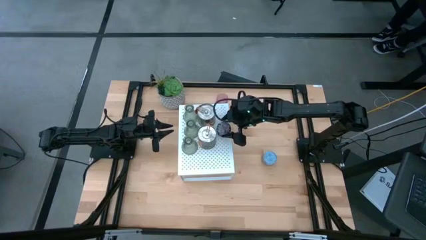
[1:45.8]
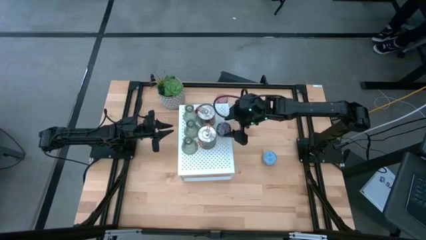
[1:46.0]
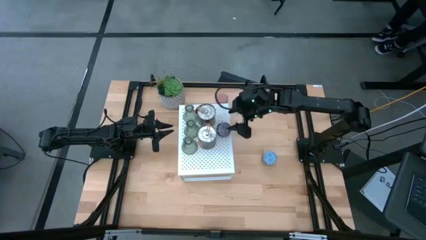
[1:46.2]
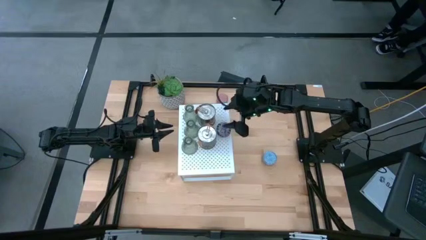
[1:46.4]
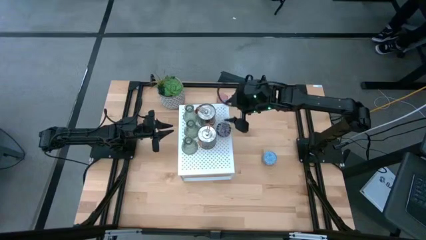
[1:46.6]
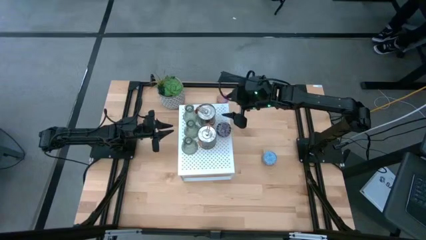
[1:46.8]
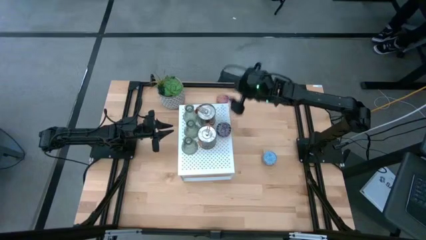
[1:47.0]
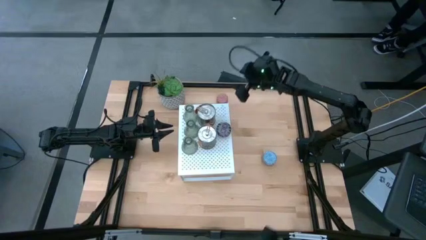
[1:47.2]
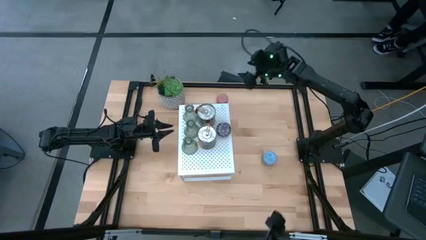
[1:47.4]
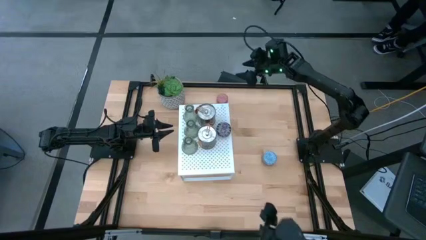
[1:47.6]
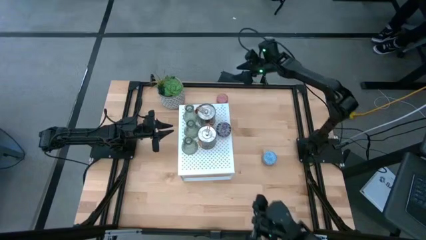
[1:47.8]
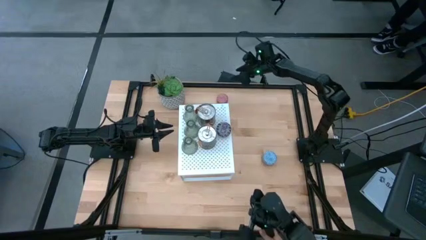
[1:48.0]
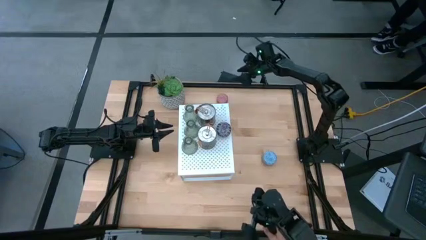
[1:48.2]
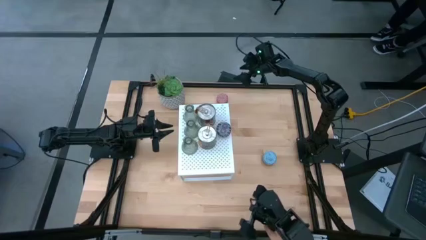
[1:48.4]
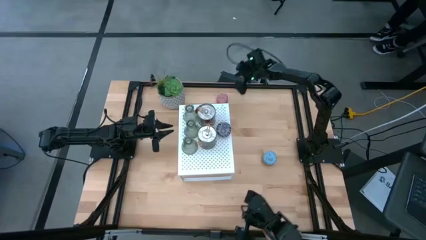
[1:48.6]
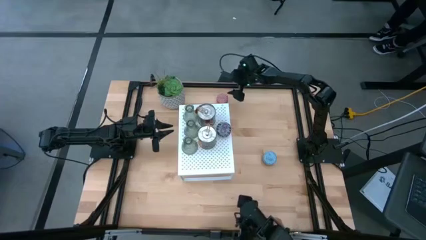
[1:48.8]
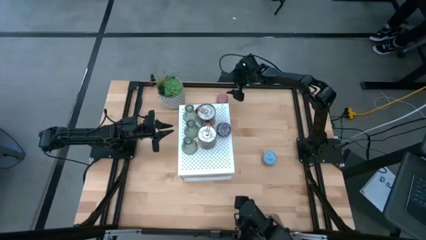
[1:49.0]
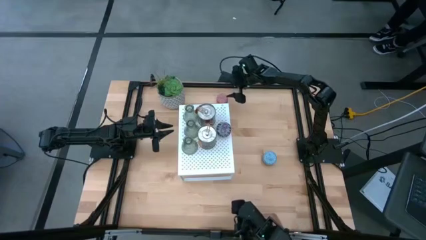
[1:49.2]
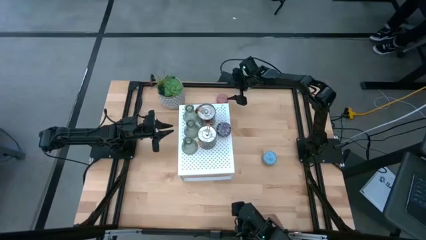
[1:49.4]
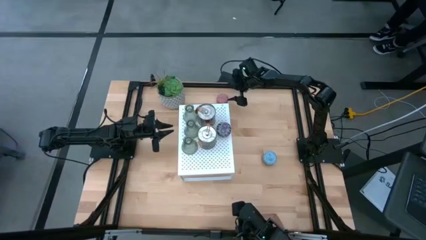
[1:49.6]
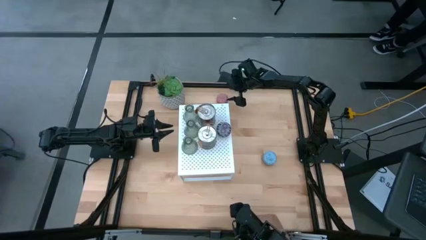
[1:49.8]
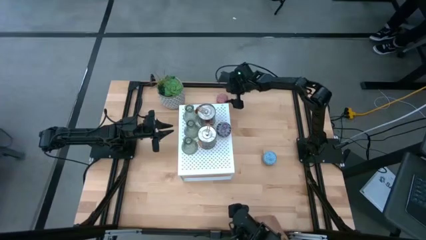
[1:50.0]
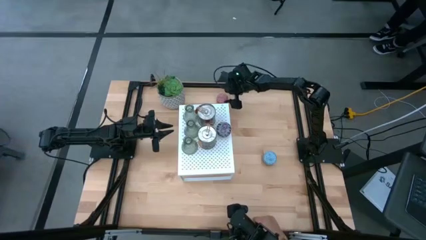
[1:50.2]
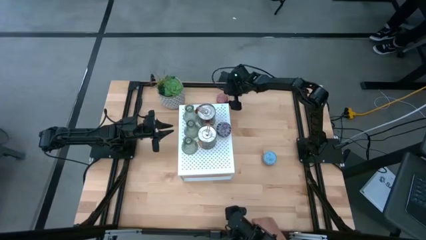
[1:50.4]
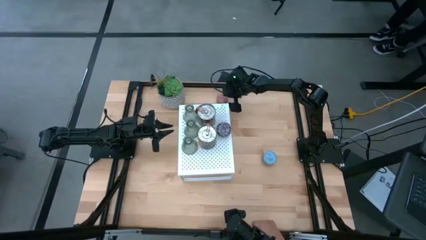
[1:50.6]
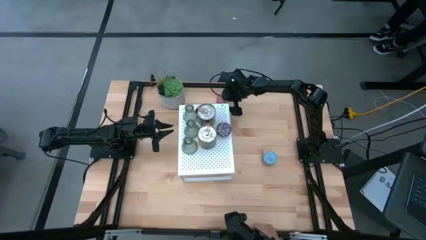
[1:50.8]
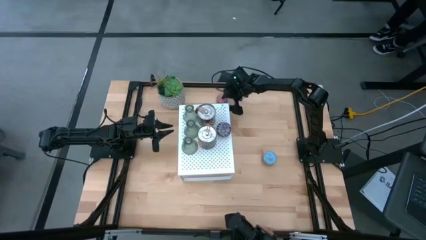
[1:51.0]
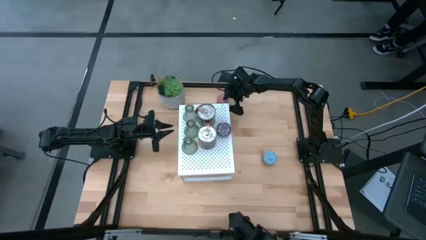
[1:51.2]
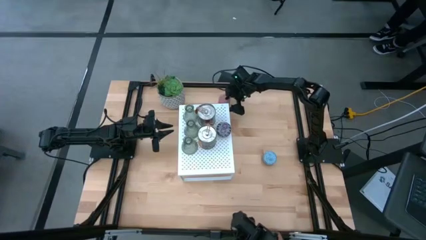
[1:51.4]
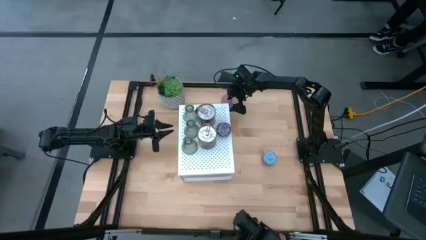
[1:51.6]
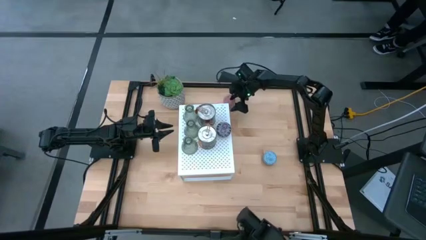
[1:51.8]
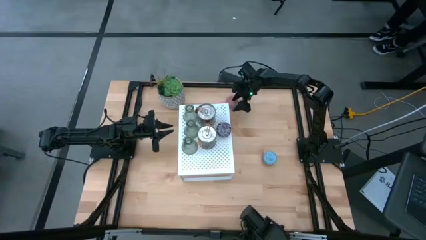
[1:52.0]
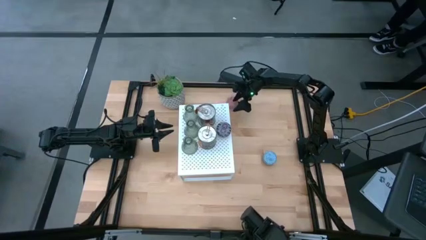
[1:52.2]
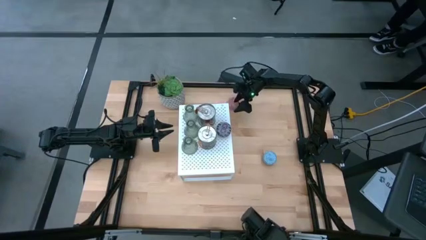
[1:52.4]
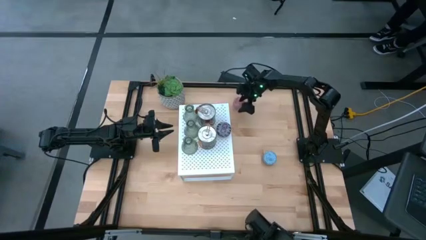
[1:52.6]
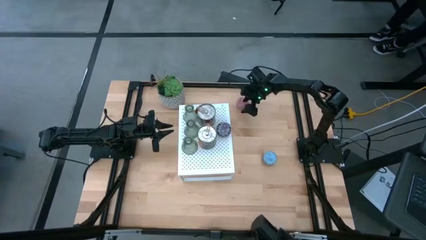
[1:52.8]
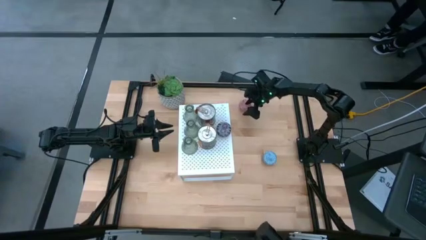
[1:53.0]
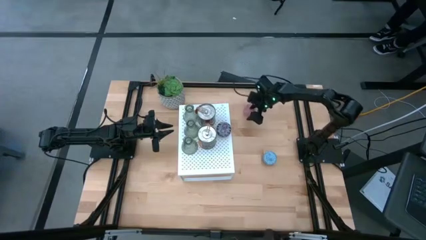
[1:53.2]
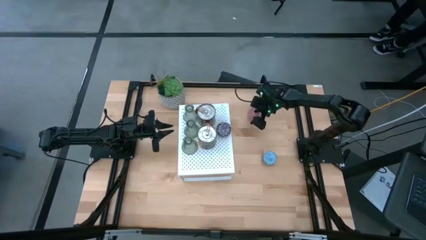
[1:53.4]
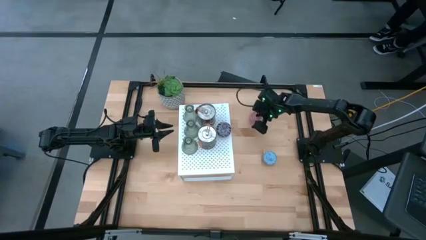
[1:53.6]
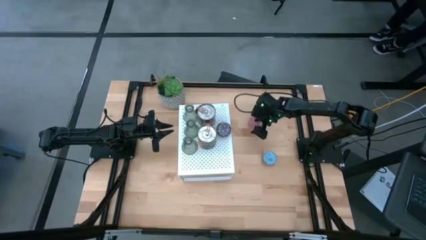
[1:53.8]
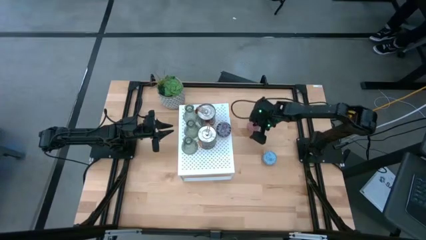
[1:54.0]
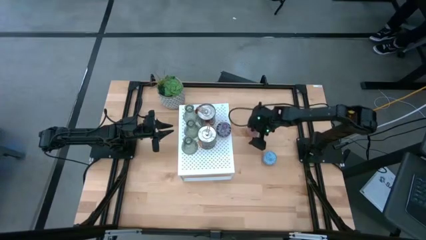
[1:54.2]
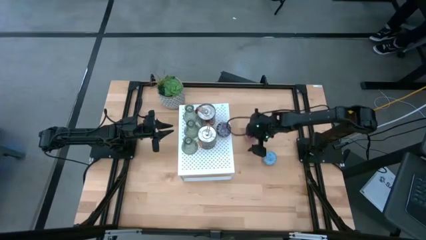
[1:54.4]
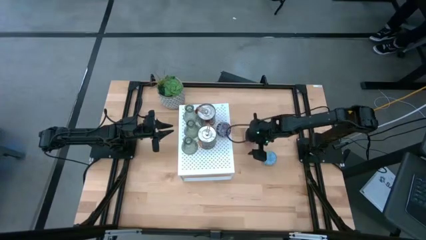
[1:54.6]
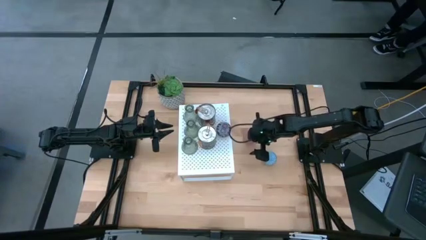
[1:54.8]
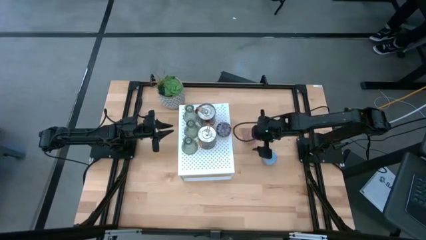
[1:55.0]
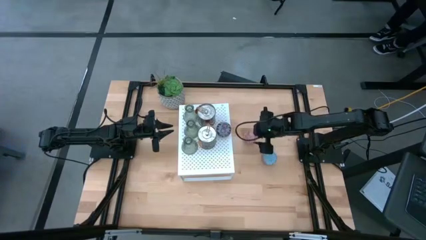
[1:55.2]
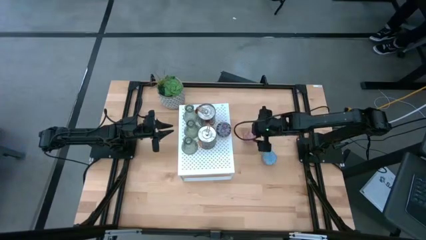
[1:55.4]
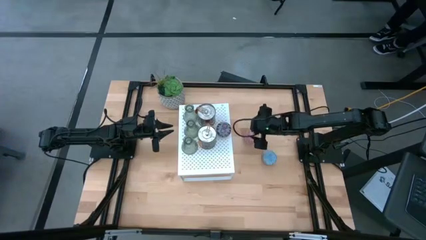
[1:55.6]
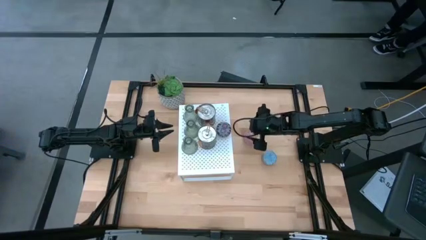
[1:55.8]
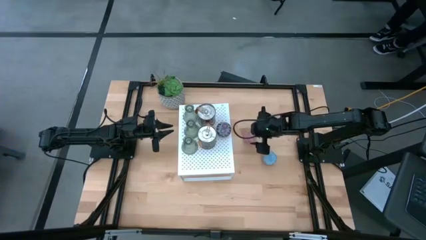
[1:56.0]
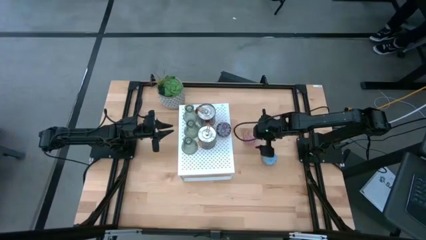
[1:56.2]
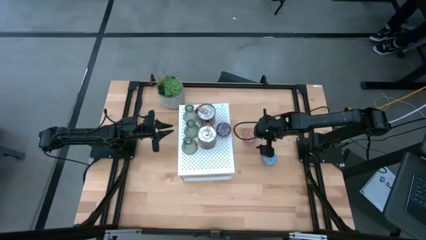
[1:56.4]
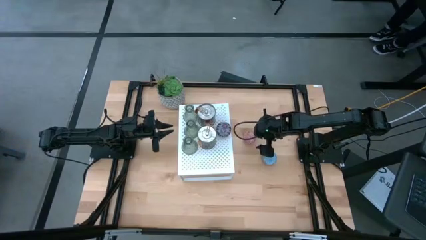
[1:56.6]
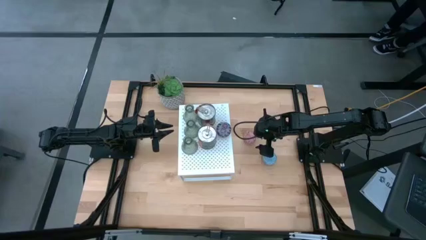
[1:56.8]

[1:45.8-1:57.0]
Task: Pick & Place candle stick holders
Align the red patterned scented candle with the black patterned scented candle on the shelf

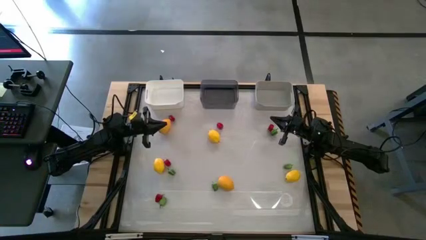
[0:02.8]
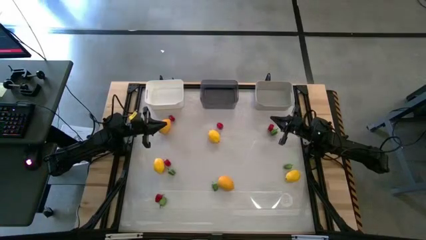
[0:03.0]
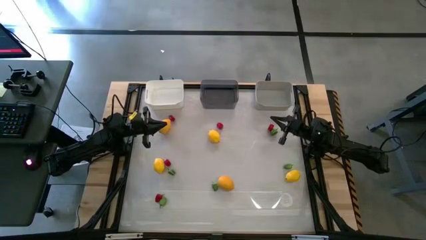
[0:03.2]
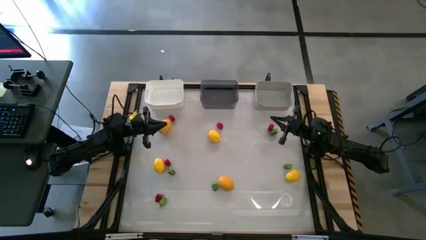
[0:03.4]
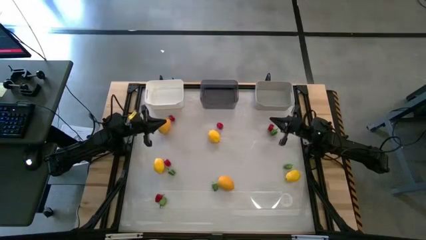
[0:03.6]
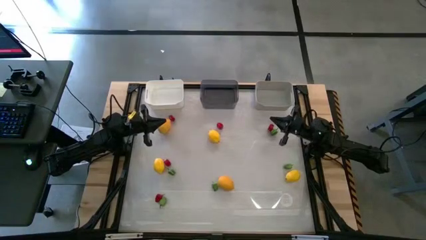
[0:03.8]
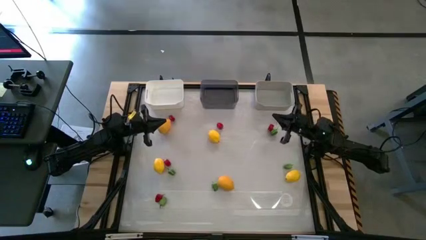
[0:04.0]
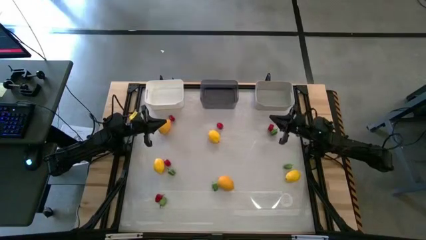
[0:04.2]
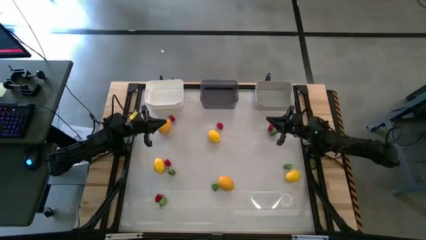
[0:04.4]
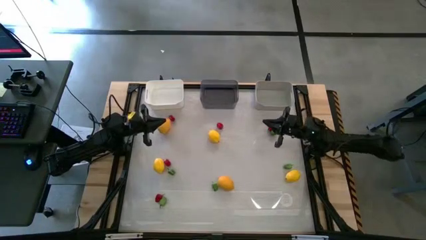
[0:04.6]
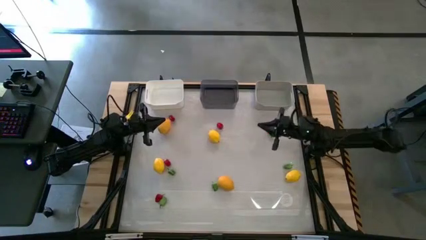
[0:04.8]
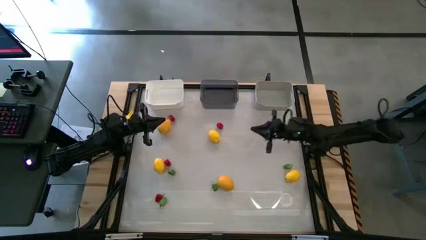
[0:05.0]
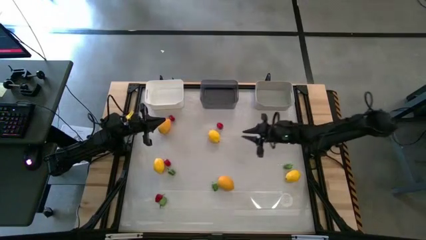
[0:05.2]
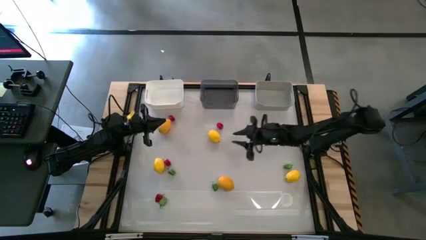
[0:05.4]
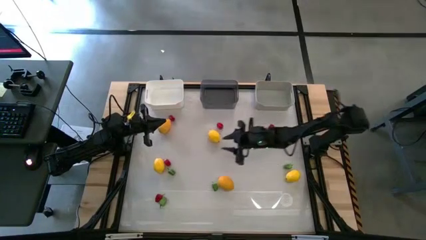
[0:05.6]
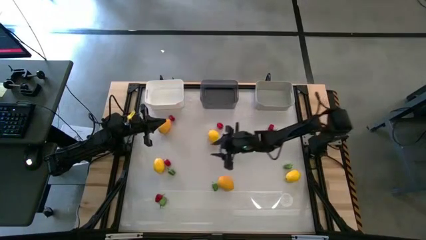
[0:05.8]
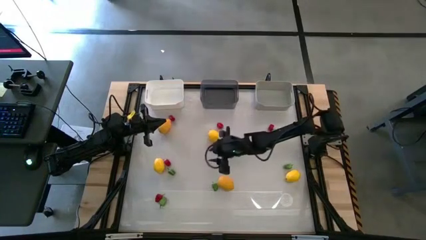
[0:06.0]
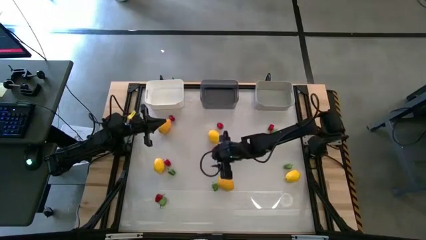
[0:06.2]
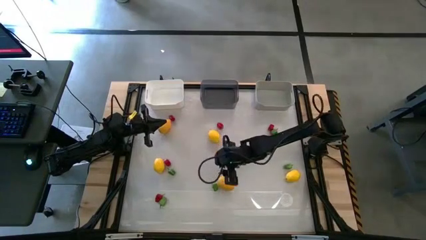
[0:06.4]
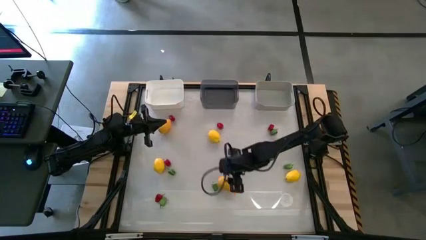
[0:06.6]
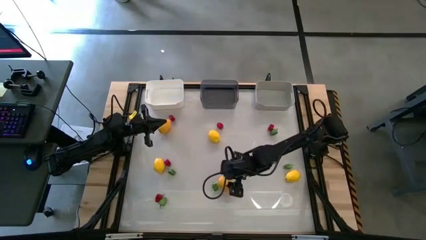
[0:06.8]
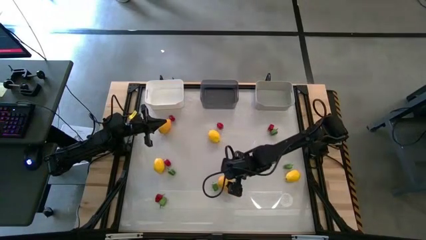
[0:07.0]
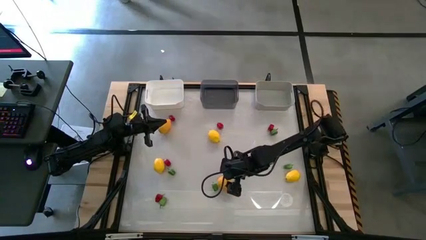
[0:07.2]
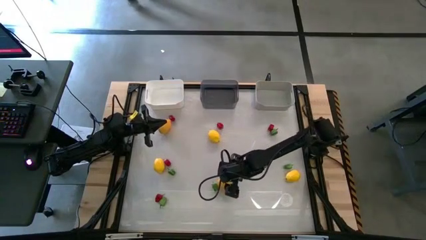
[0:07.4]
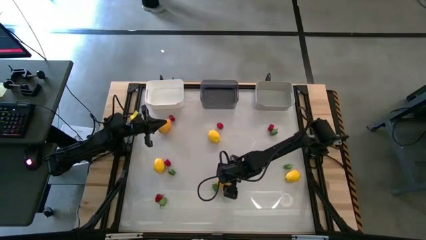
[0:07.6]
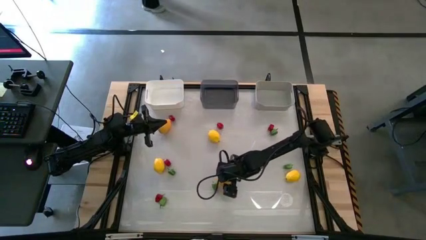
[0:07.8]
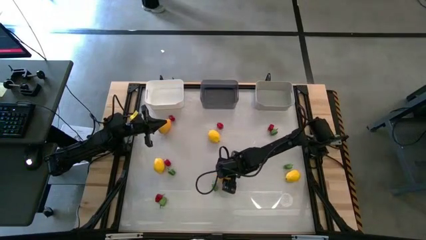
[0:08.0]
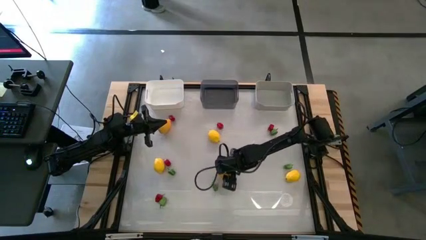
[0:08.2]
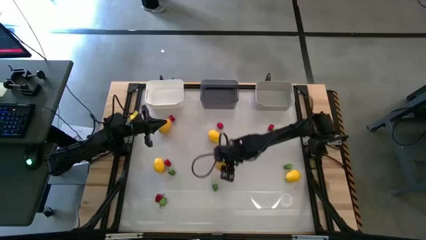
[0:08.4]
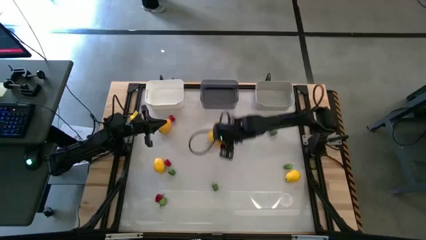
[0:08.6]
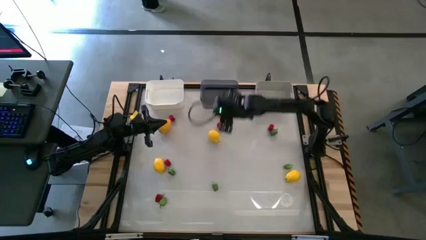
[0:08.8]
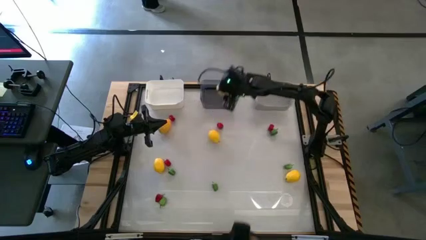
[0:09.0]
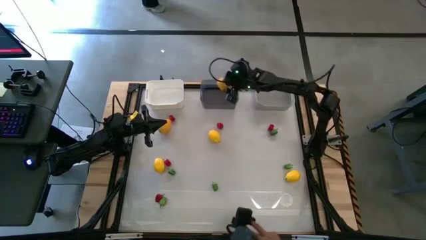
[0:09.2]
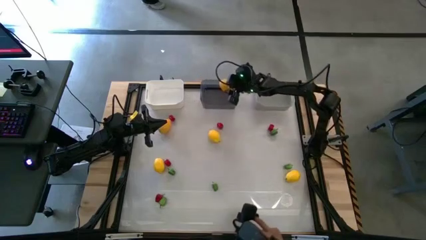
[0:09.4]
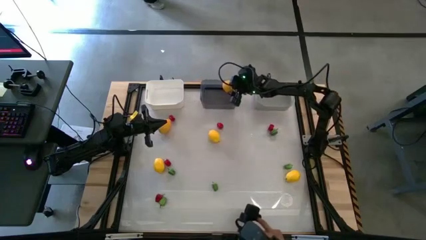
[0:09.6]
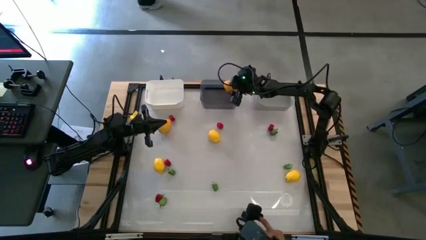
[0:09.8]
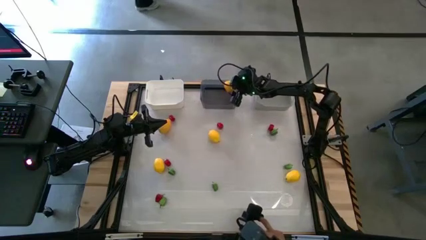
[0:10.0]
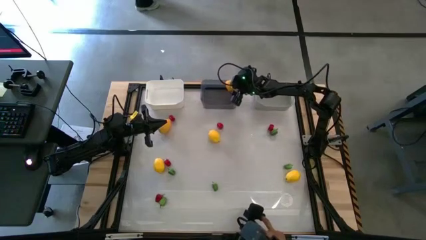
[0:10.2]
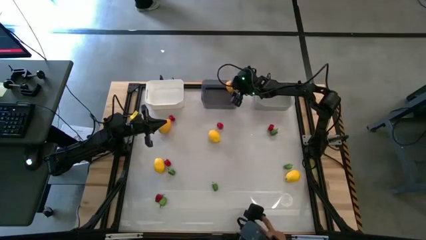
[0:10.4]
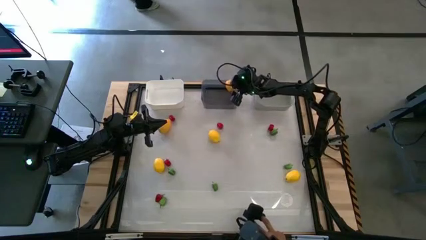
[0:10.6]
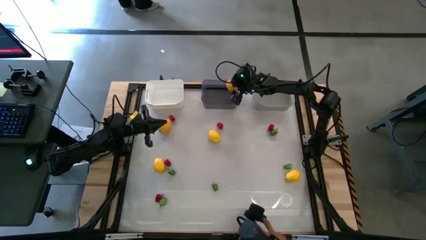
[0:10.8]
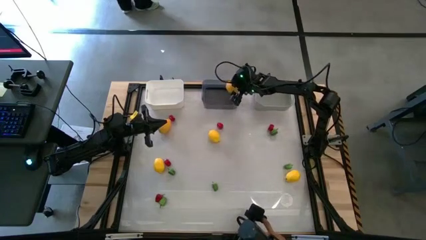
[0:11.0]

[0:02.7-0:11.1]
Task: Sort produce into baskets
Put the lemon into the black bin
